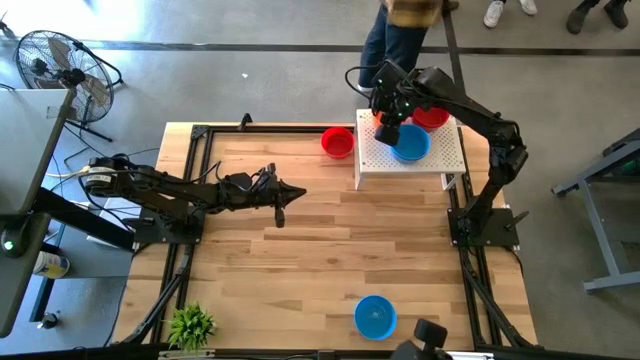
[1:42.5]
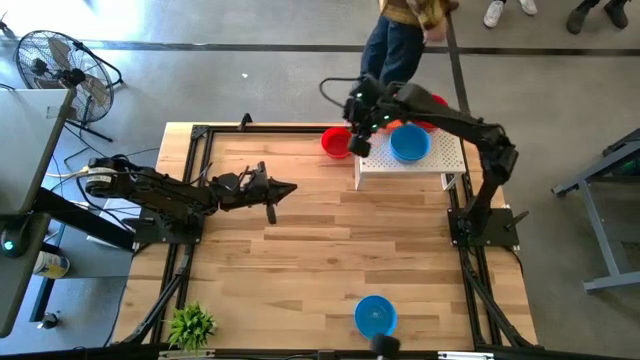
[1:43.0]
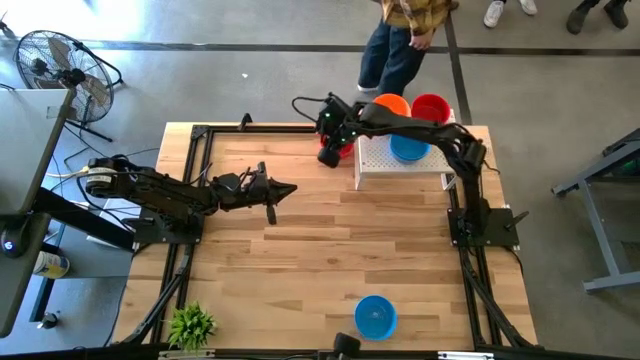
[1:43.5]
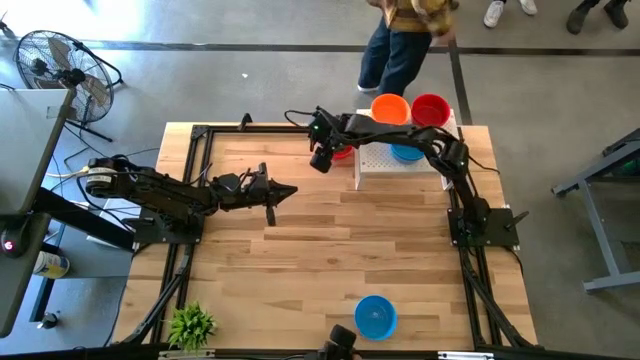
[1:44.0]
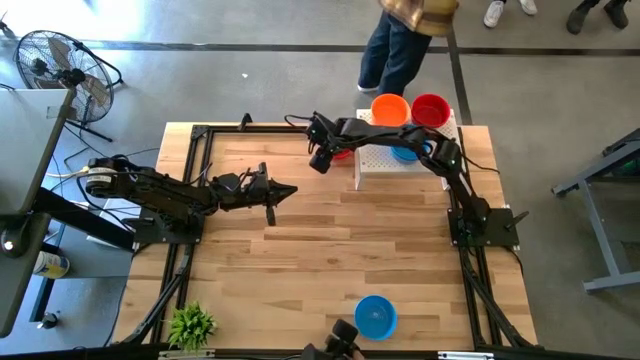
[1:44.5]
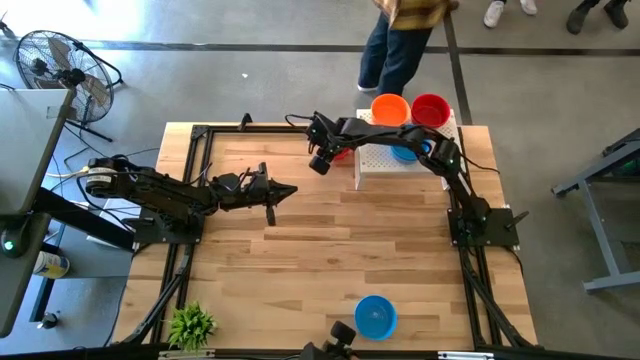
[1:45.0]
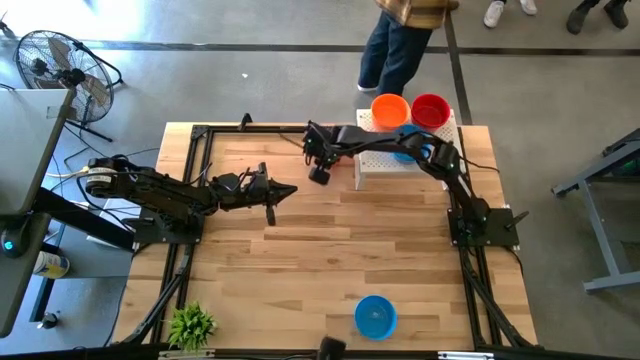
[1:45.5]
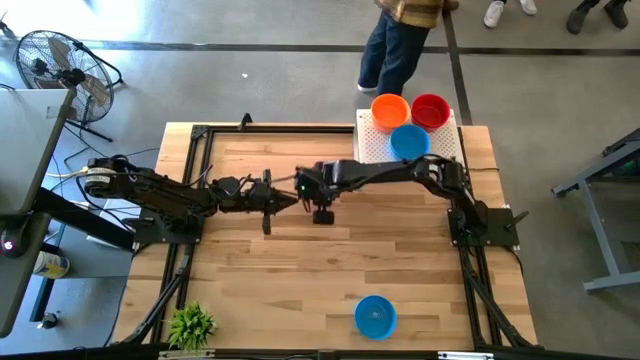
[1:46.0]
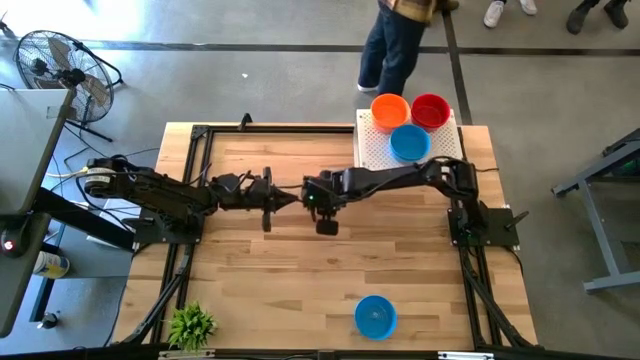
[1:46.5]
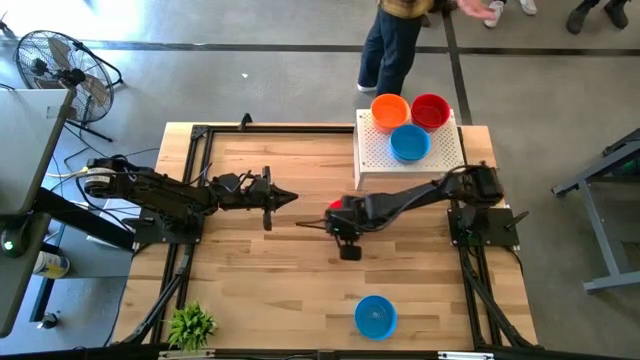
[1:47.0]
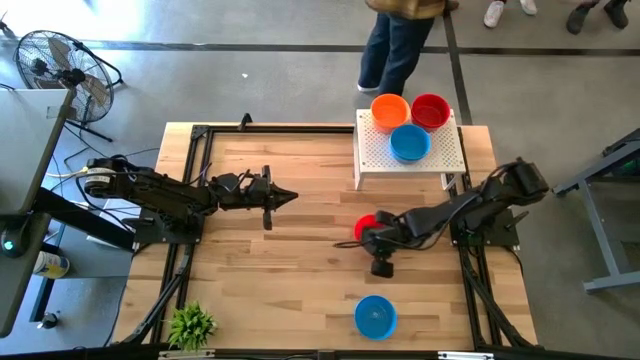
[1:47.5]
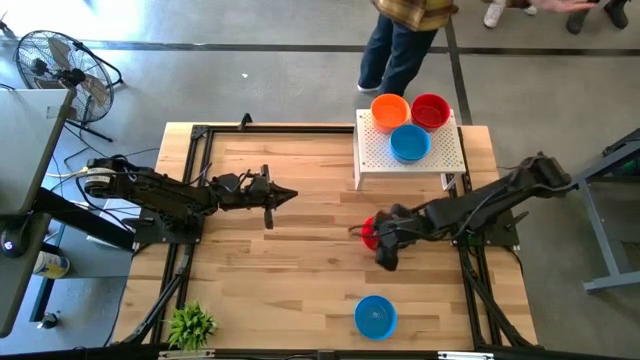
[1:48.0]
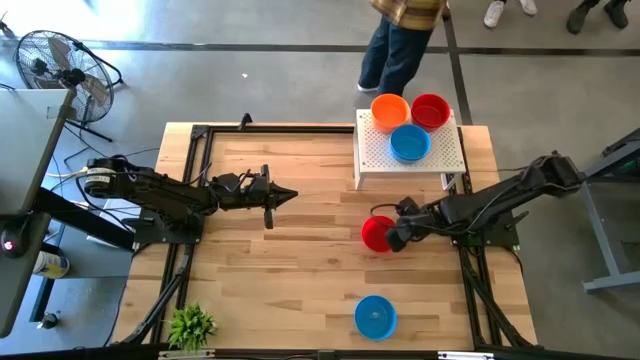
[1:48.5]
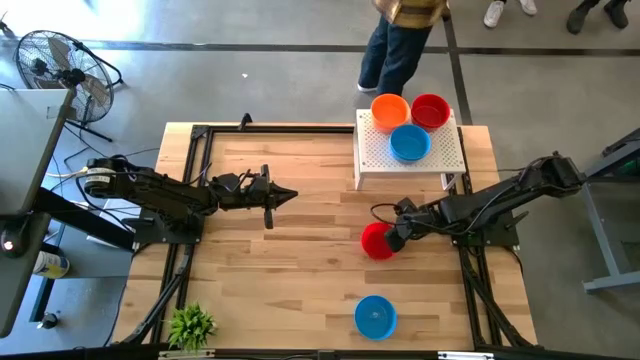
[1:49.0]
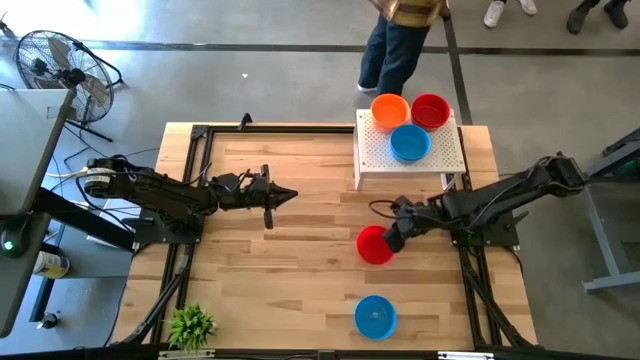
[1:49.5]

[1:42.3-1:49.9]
Task: Pick & Place Mini bowls
Stack the red bowl on the stacked red bowls on the shelf

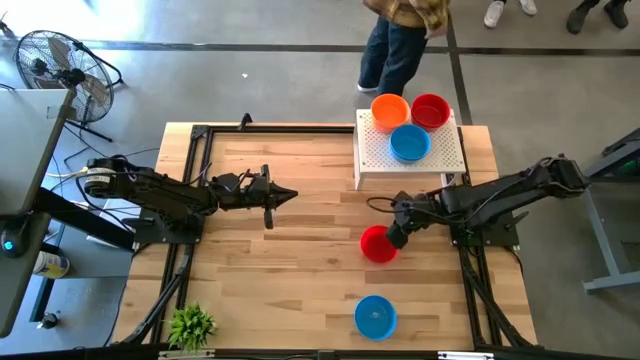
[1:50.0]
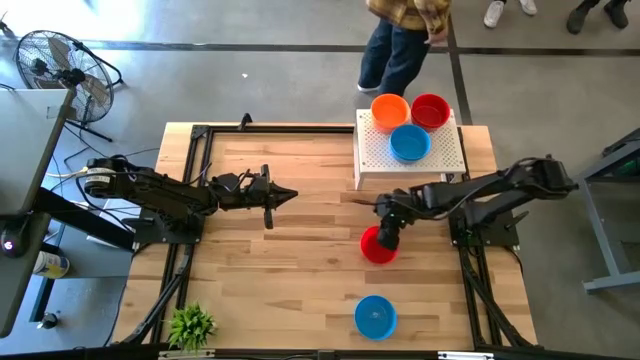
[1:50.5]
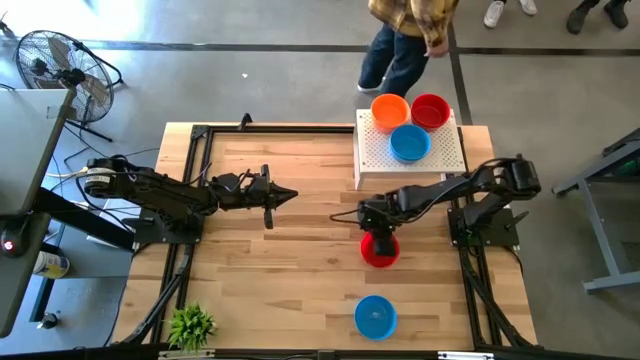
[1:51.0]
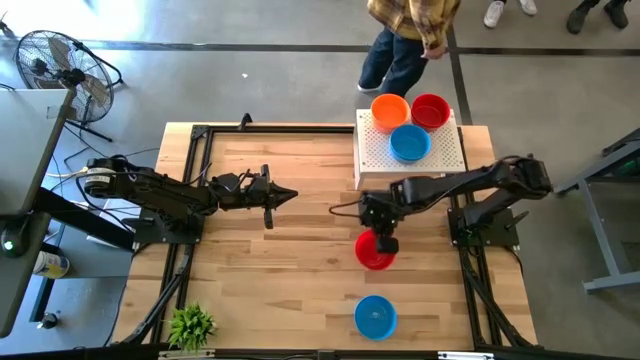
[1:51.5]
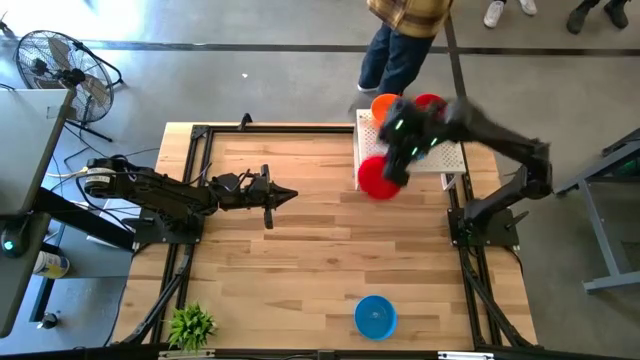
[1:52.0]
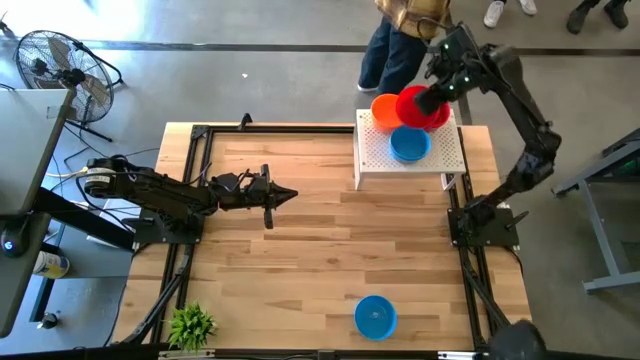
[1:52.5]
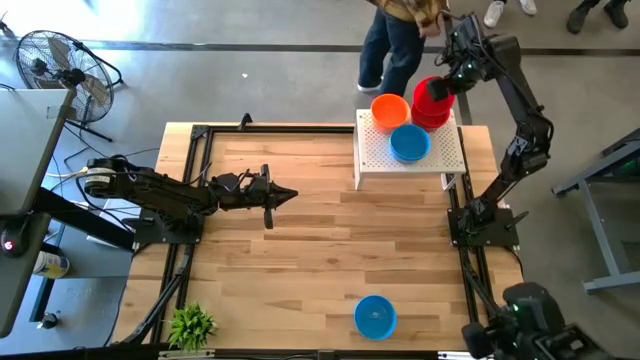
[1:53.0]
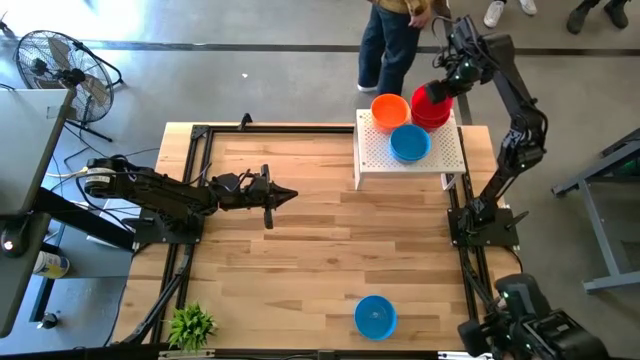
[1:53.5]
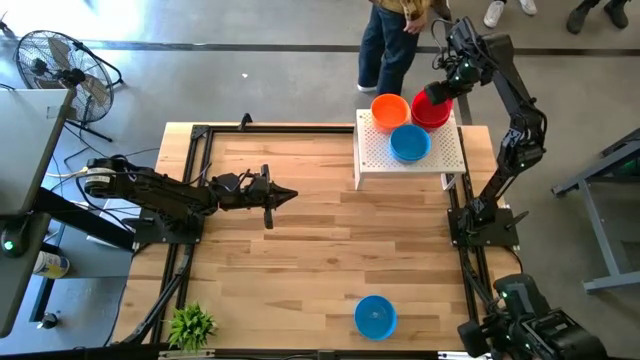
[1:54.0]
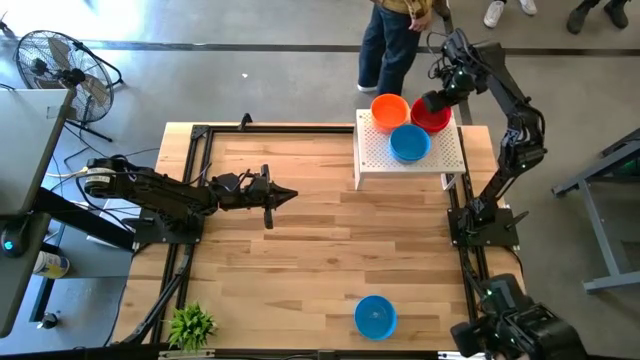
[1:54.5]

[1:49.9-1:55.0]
Stack the red bowl on the stacked red bowls on the shelf

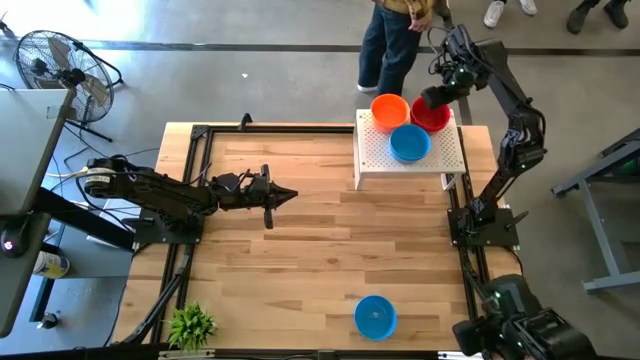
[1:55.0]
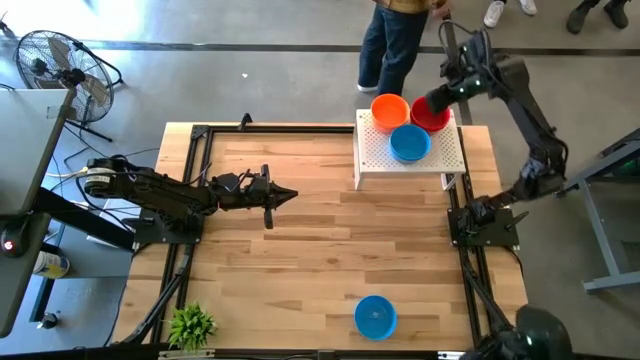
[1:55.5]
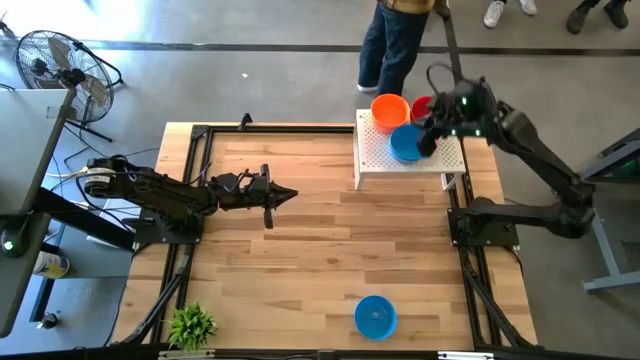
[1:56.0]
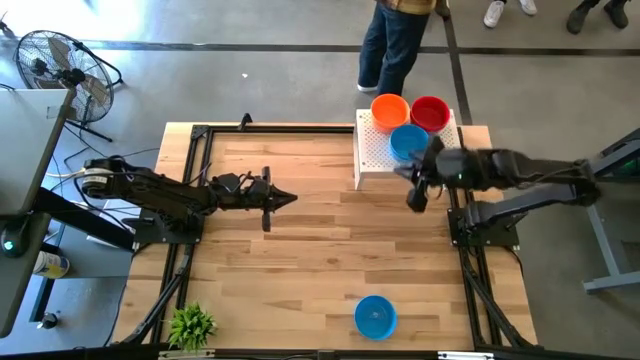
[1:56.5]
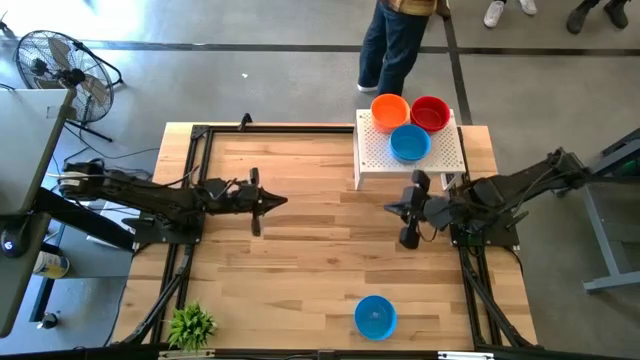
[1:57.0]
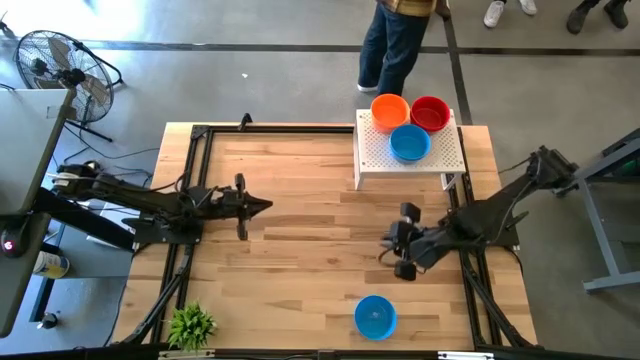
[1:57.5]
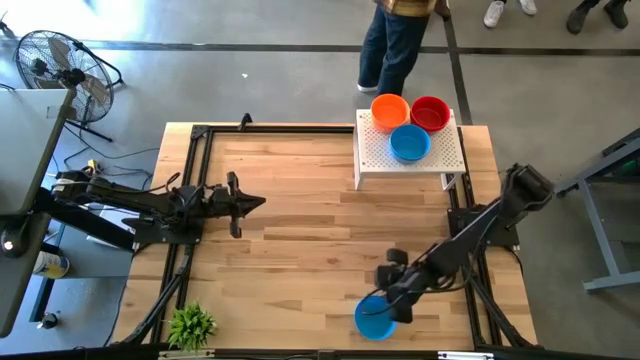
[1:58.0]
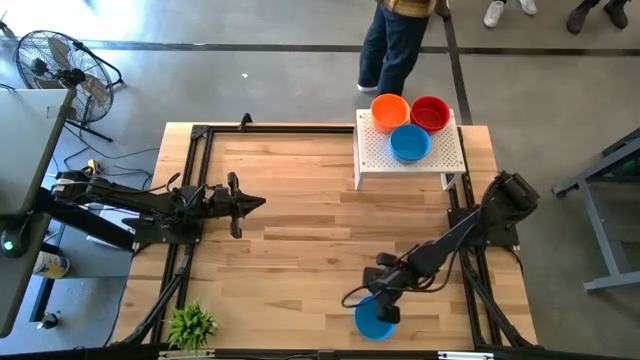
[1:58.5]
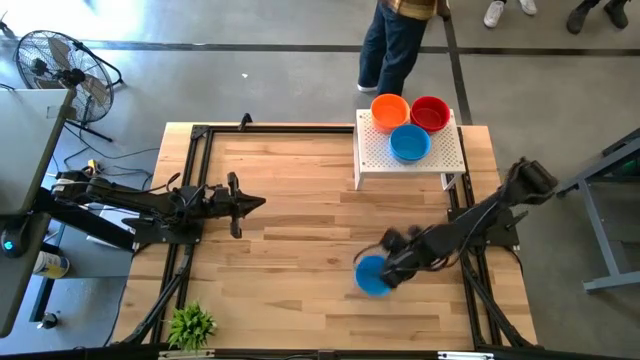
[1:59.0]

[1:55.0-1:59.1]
Stack the blue bowl on the stacked blue bowls on the shelf

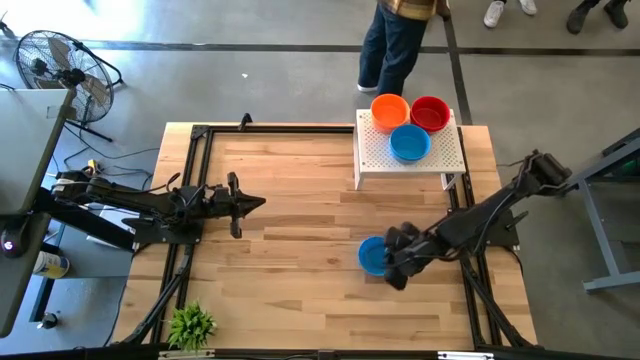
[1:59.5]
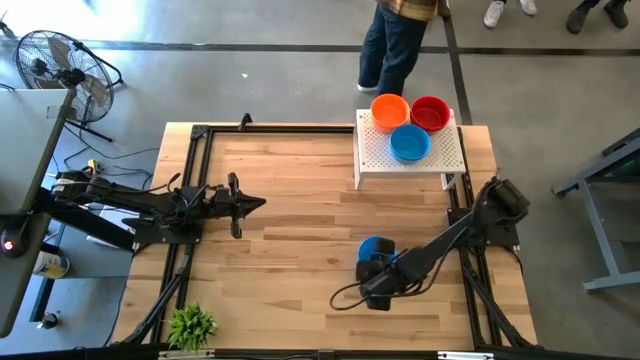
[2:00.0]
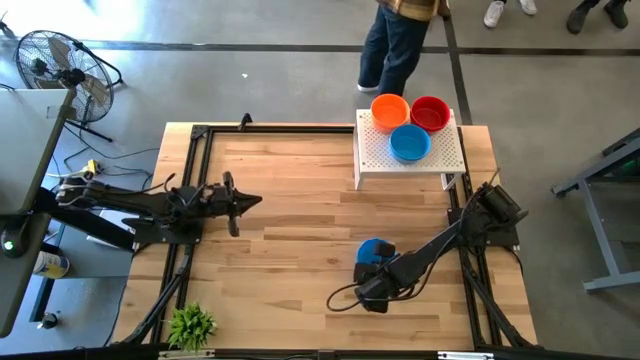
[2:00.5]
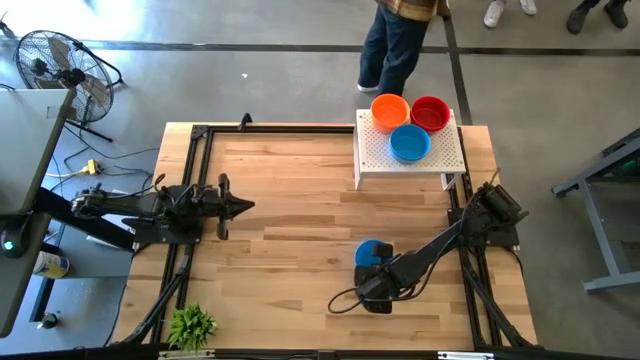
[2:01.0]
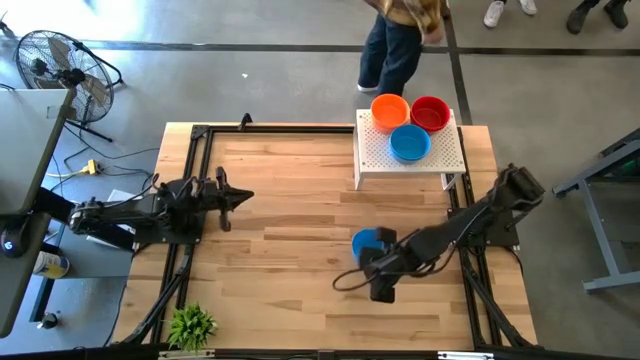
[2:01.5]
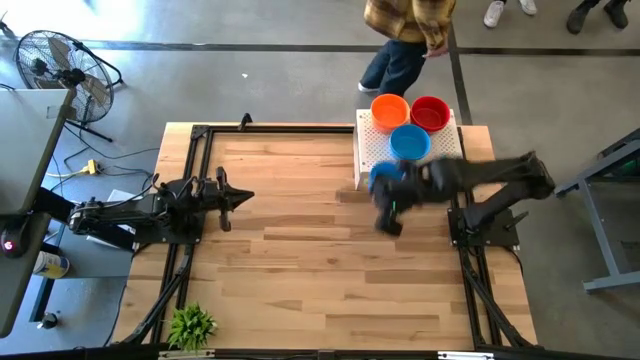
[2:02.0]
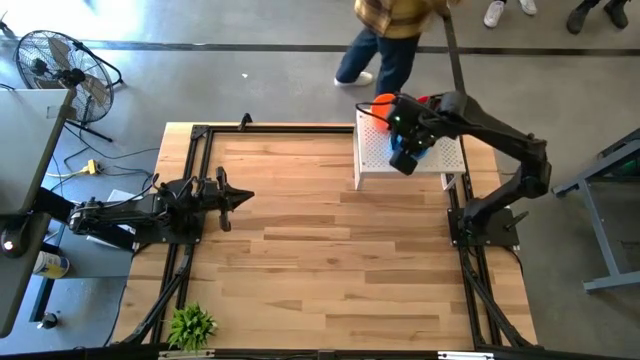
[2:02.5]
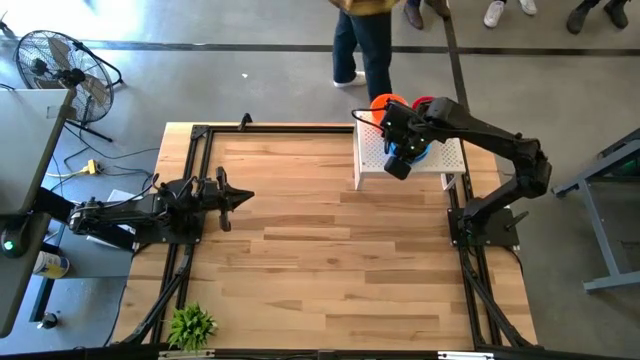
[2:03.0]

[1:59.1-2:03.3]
Stack the blue bowl on the stacked blue bowls on the shelf
